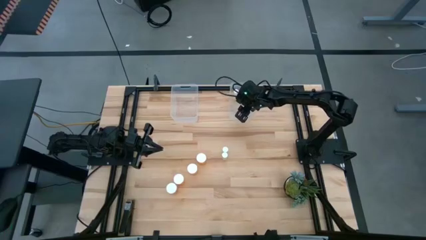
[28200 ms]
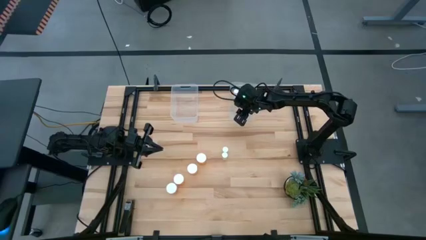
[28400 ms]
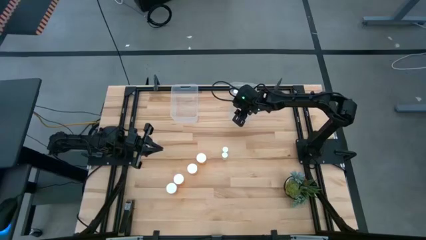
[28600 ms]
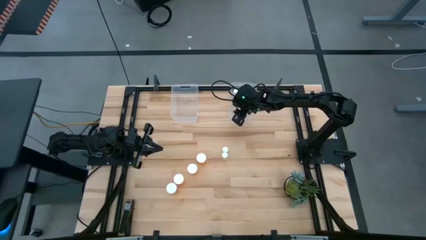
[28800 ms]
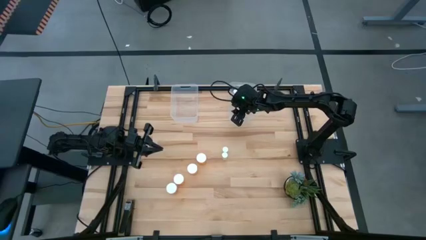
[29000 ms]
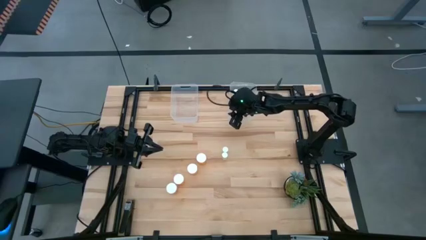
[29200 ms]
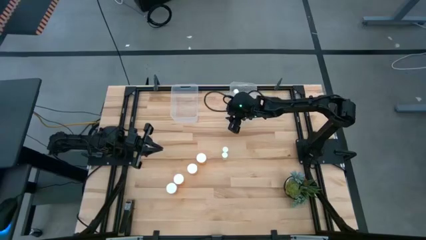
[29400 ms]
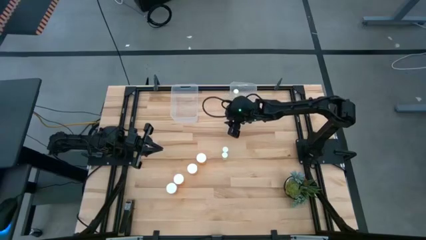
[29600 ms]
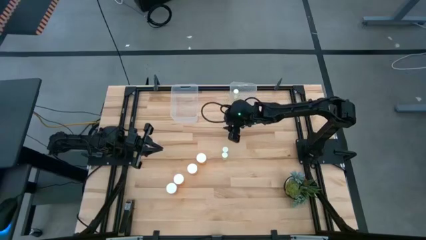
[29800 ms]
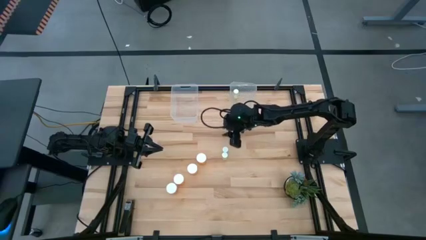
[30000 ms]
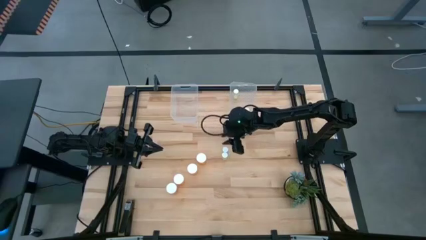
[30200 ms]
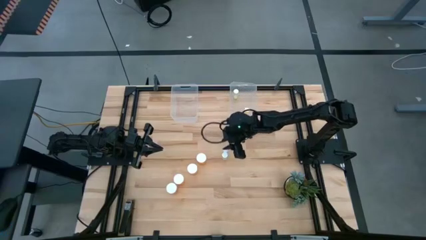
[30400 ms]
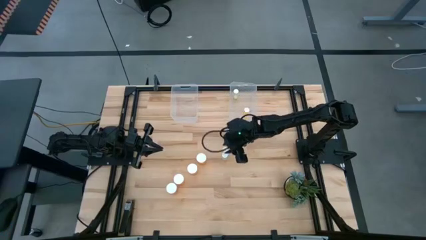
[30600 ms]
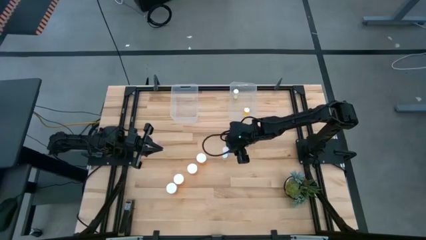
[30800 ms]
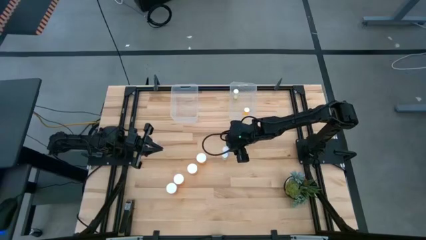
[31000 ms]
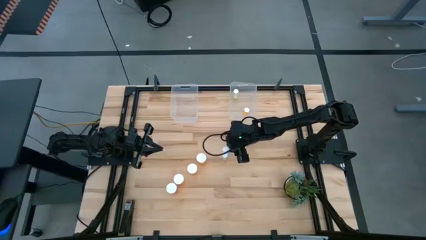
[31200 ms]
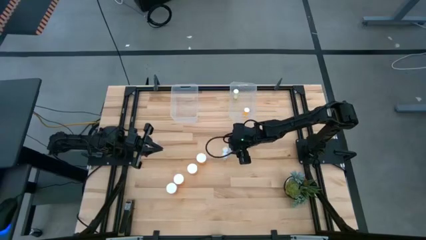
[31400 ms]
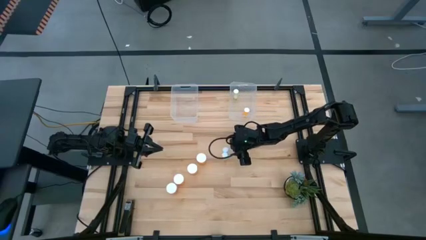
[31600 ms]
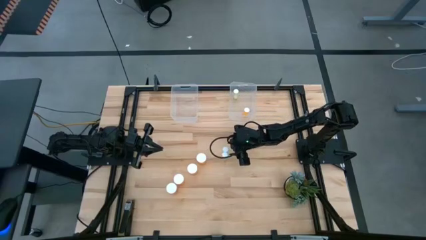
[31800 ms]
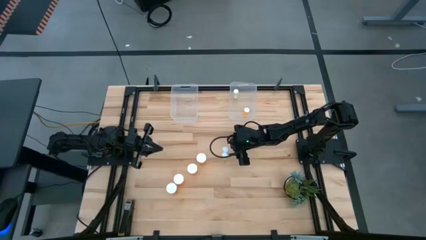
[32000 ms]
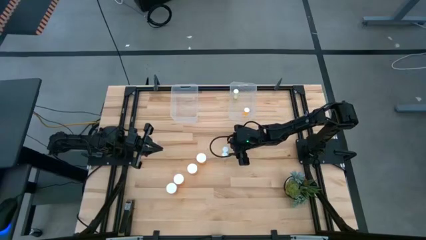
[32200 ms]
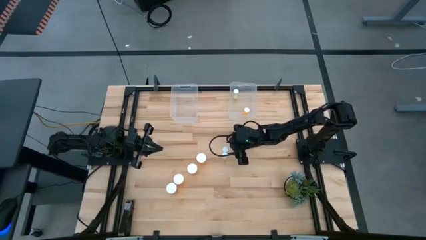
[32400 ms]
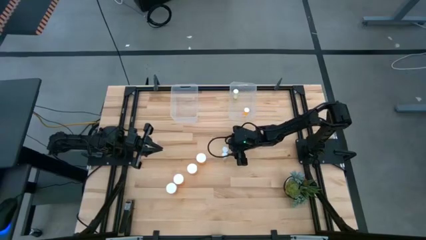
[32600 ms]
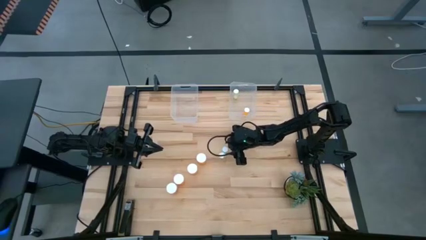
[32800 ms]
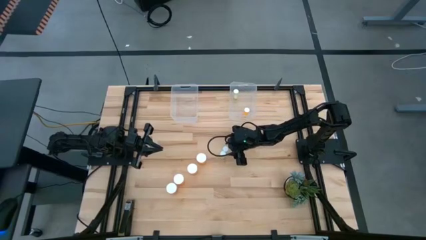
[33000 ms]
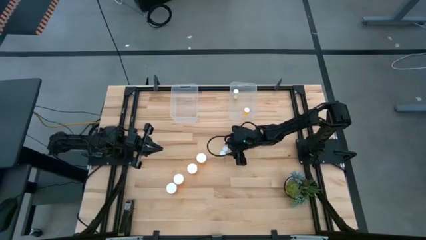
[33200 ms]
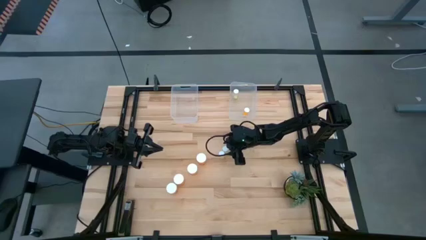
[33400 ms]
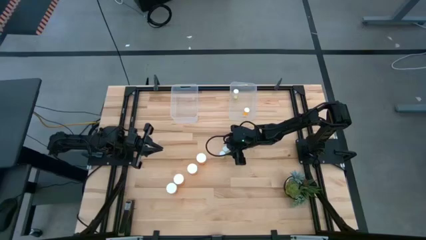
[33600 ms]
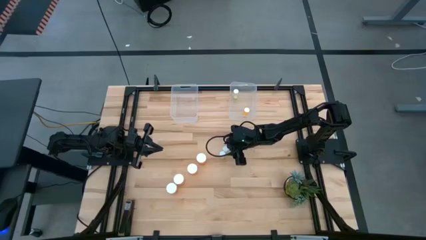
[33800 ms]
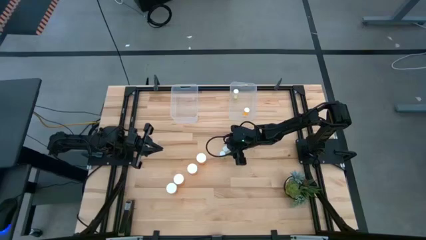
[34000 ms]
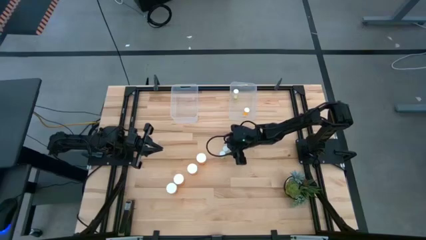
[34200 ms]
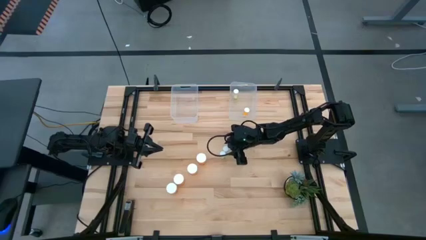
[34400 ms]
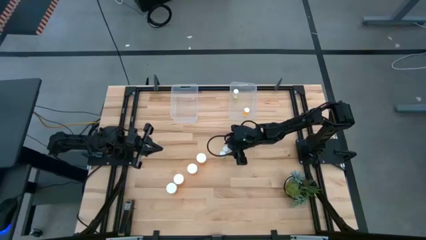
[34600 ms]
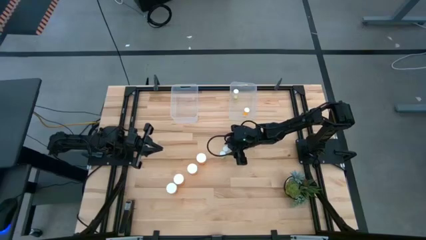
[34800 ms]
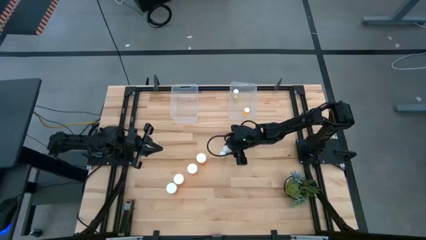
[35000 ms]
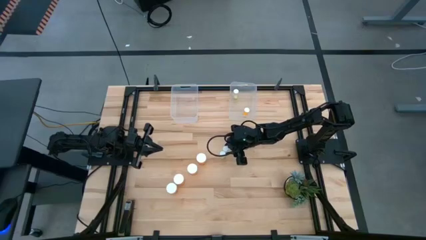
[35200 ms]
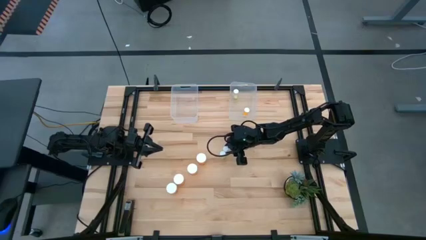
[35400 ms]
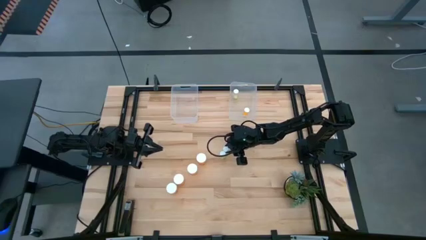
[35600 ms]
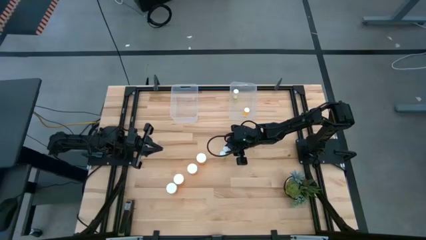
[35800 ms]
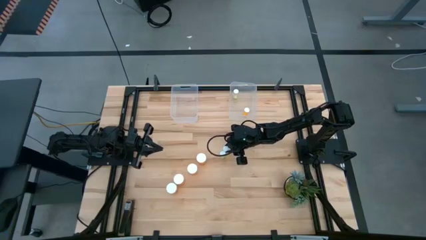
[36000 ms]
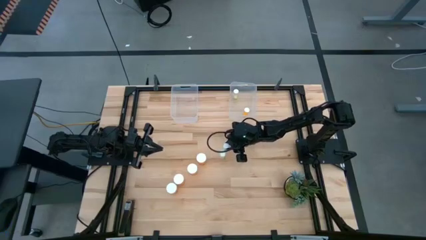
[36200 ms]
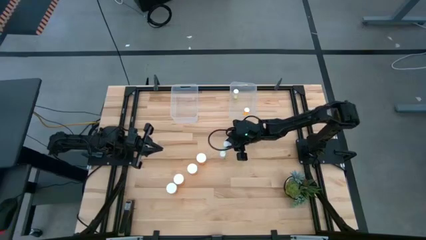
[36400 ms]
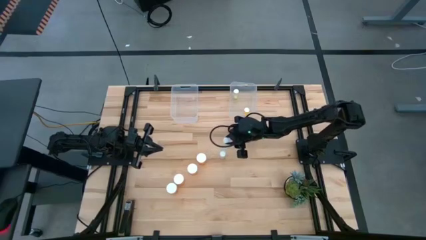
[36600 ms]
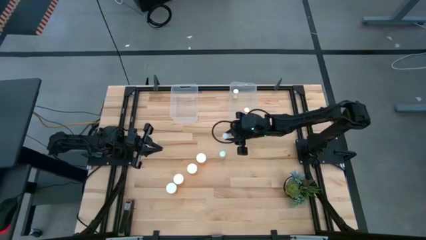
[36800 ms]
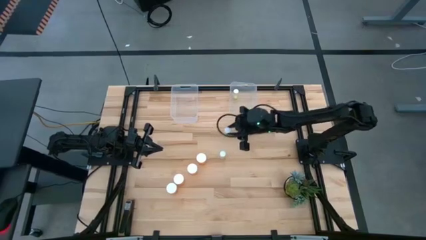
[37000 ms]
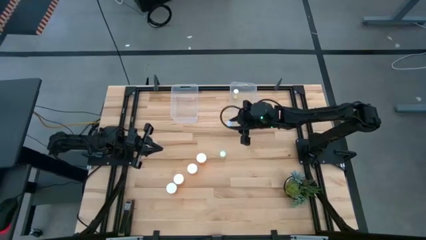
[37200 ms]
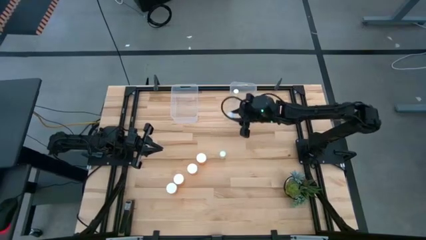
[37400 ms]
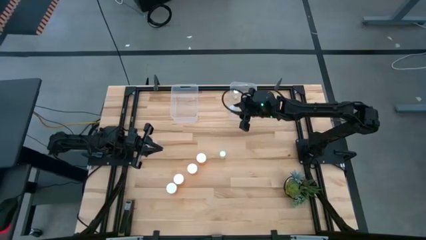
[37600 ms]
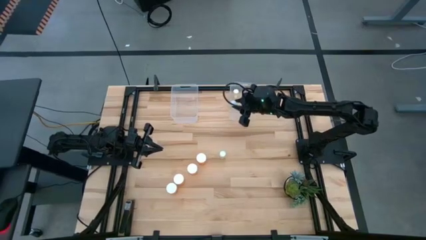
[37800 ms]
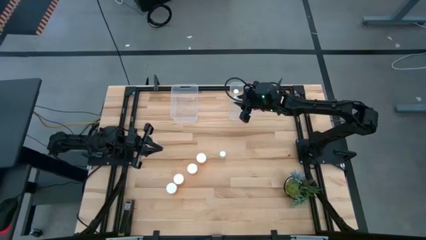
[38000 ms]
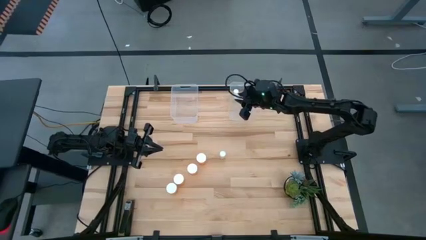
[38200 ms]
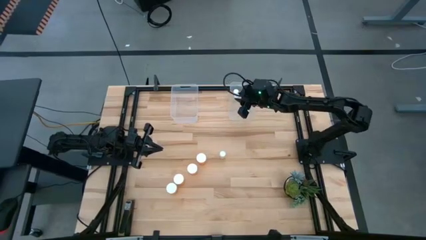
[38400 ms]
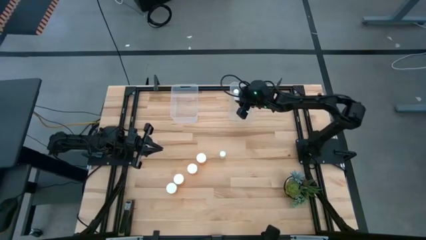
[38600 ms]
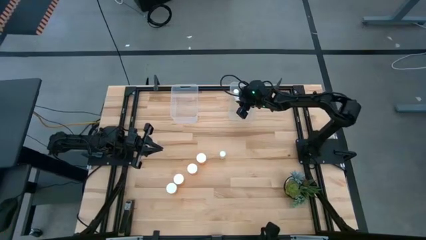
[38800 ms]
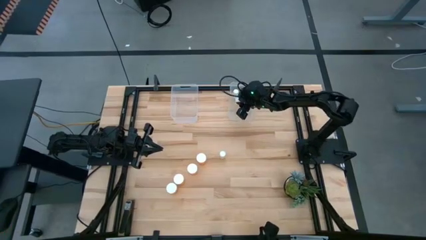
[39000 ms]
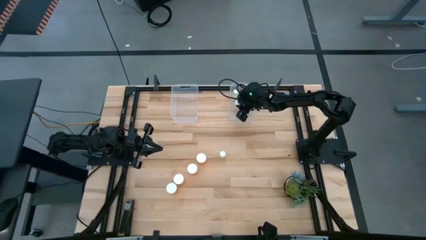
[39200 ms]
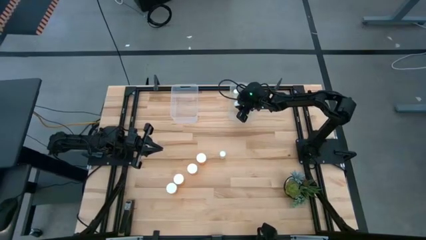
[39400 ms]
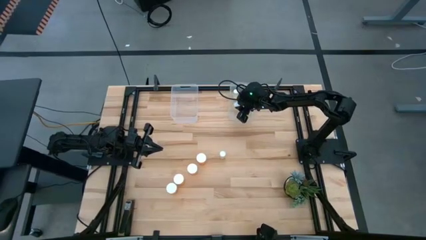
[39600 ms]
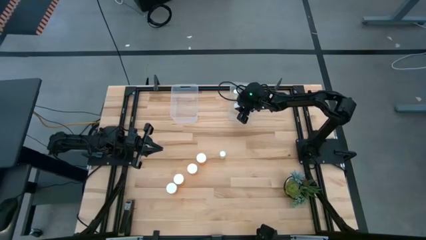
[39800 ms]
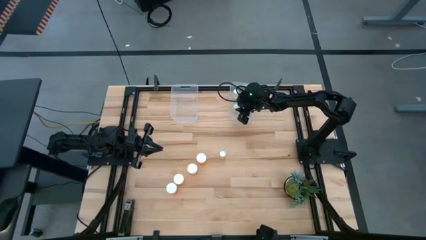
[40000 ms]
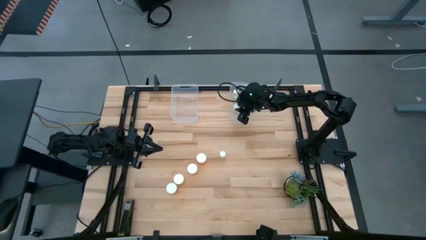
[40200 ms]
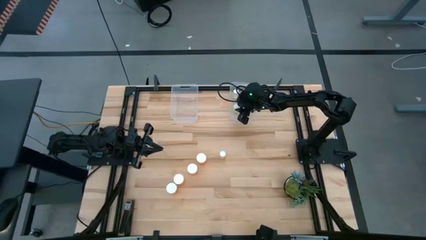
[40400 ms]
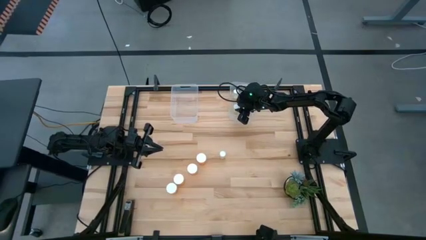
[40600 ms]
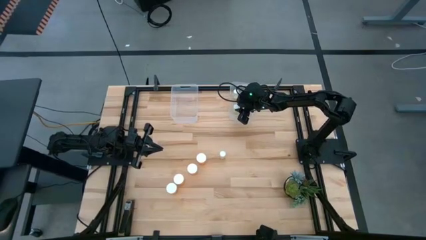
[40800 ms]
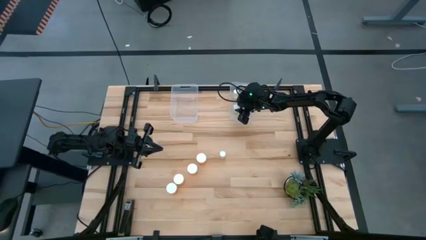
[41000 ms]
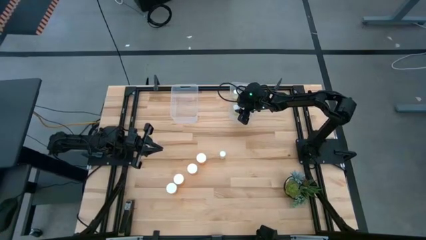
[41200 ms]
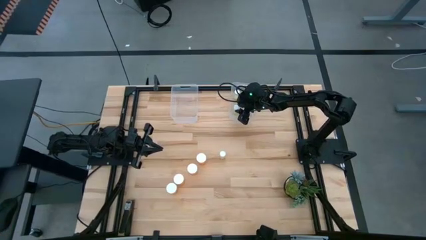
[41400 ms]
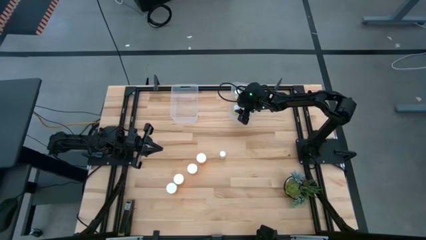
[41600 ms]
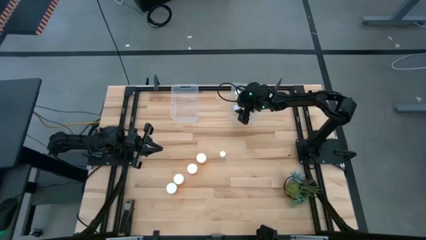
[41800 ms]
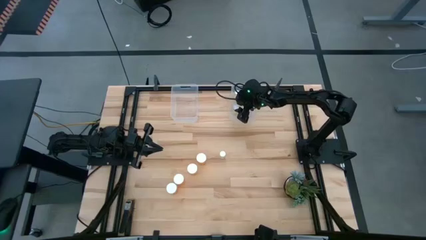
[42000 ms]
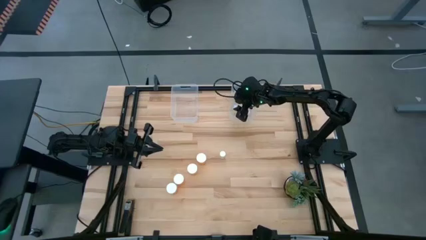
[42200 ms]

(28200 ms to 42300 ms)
Task: Pick and place medicine bottles into bin by pill shape (circle, oval)
Put the top small yellow pill bottle into the right transparent bin
